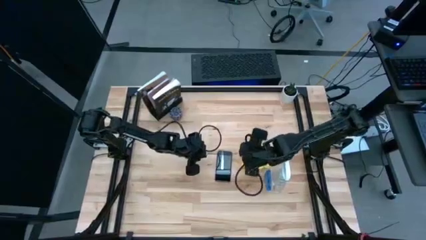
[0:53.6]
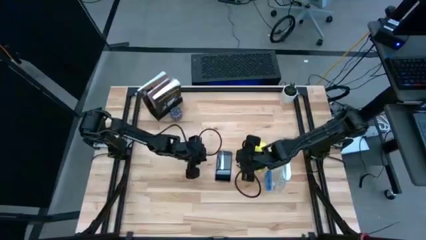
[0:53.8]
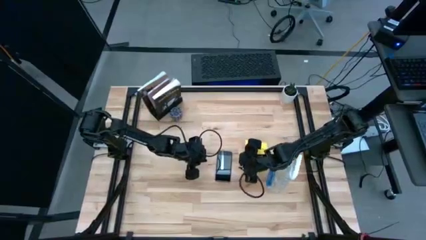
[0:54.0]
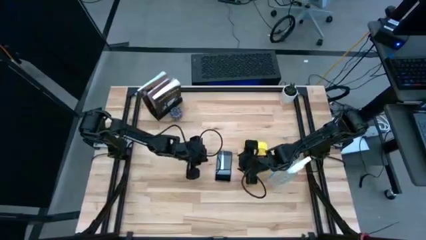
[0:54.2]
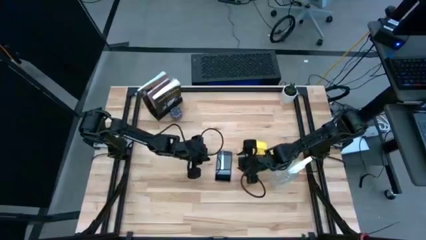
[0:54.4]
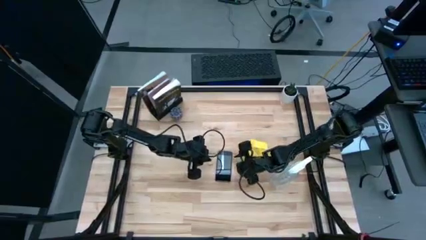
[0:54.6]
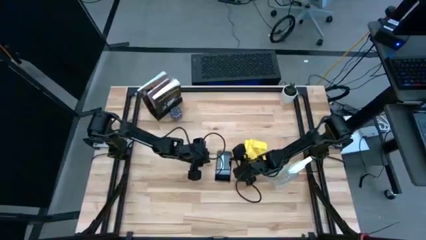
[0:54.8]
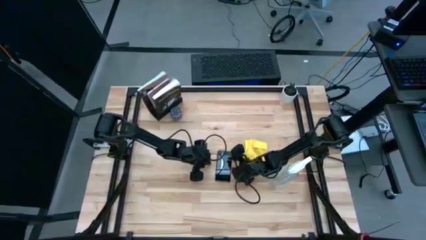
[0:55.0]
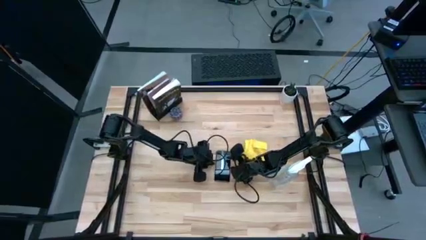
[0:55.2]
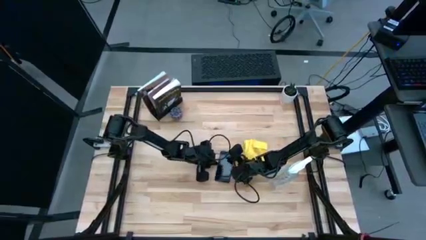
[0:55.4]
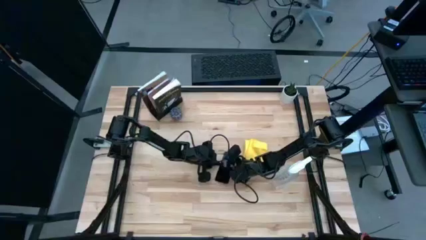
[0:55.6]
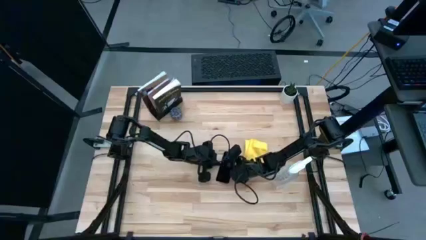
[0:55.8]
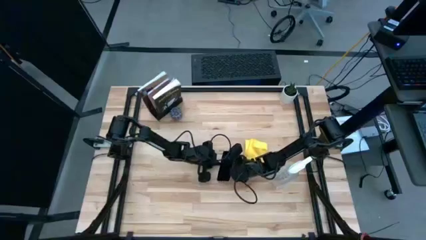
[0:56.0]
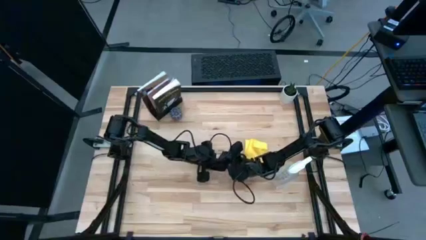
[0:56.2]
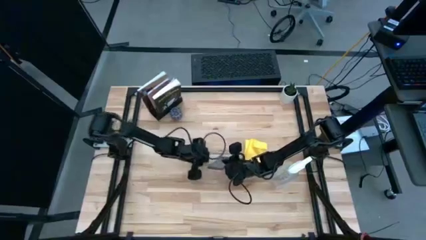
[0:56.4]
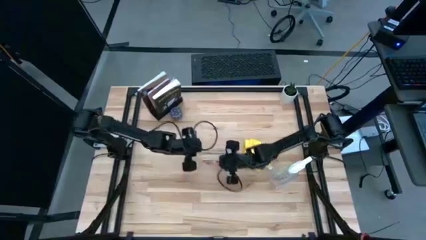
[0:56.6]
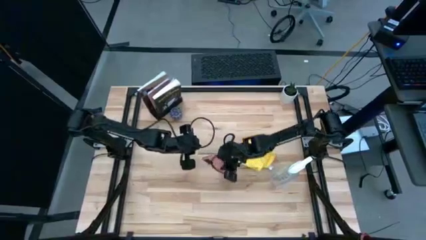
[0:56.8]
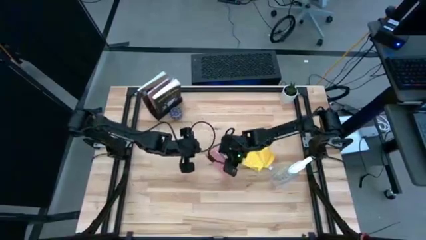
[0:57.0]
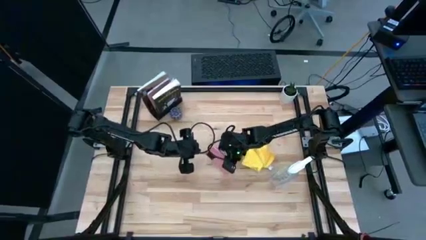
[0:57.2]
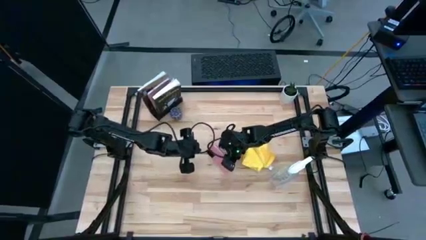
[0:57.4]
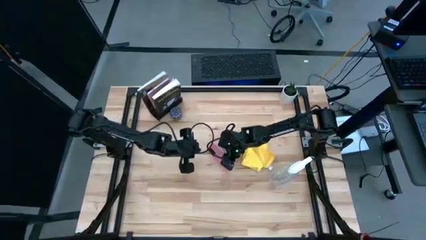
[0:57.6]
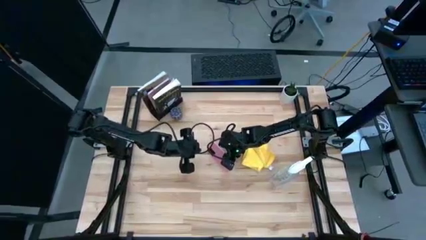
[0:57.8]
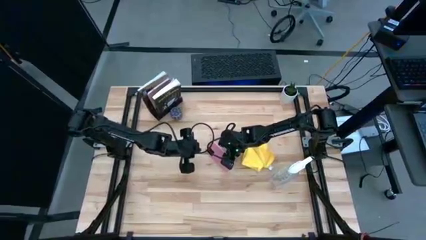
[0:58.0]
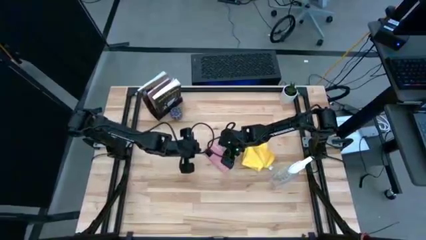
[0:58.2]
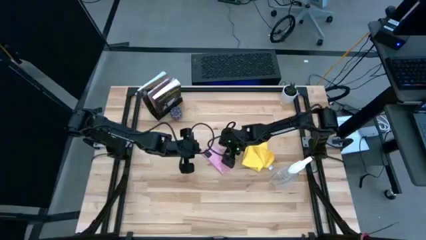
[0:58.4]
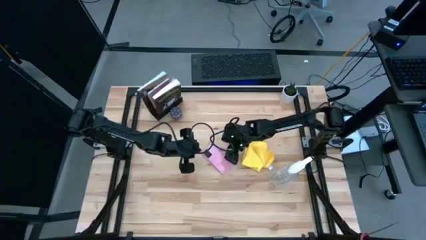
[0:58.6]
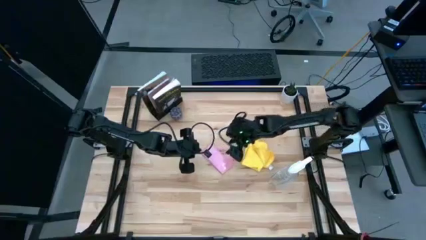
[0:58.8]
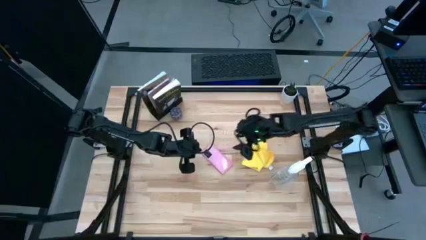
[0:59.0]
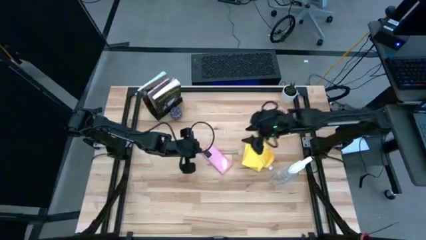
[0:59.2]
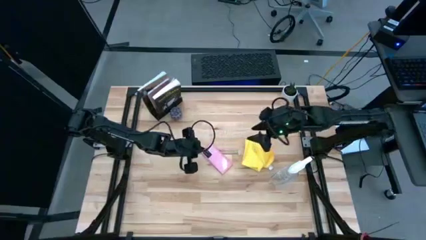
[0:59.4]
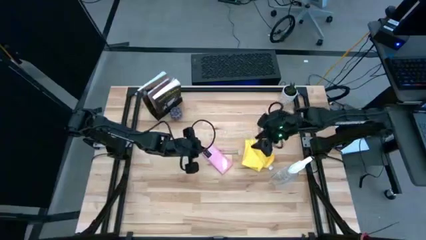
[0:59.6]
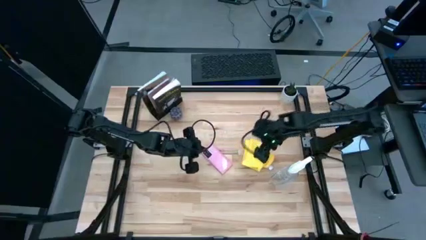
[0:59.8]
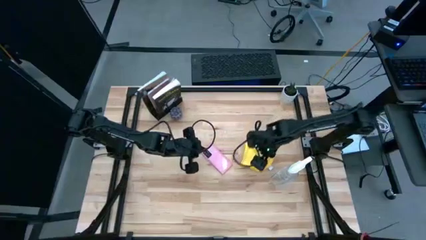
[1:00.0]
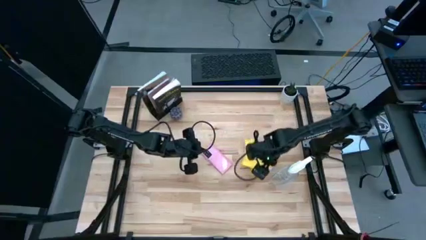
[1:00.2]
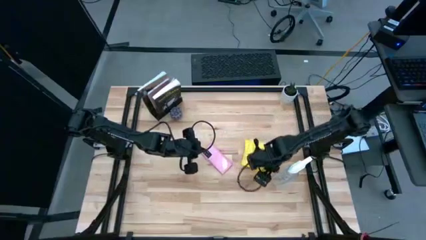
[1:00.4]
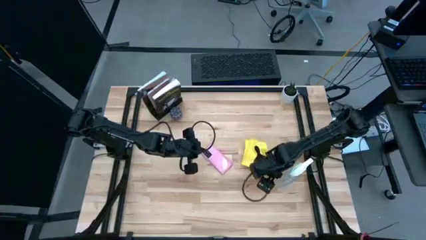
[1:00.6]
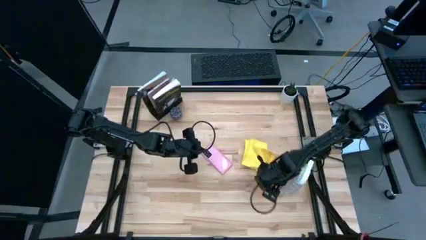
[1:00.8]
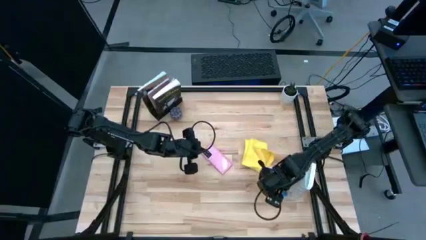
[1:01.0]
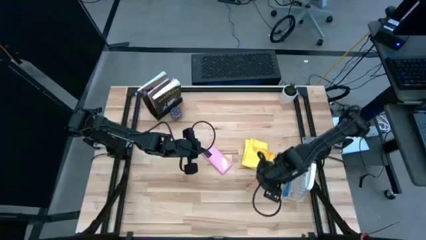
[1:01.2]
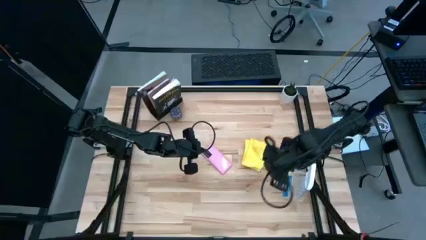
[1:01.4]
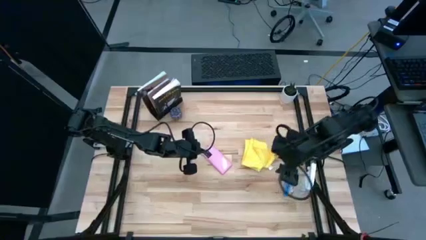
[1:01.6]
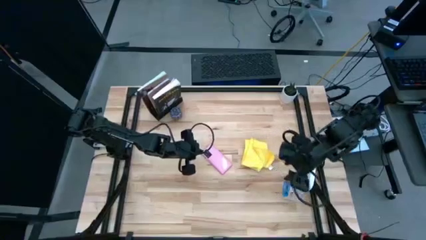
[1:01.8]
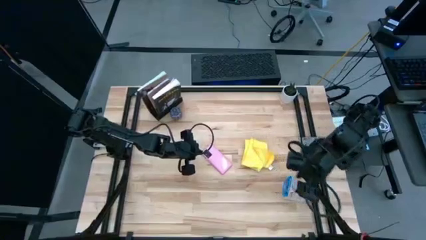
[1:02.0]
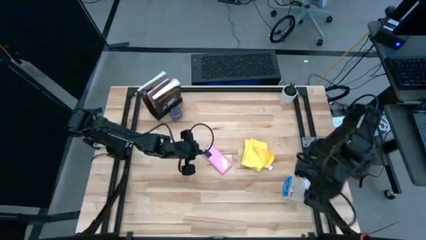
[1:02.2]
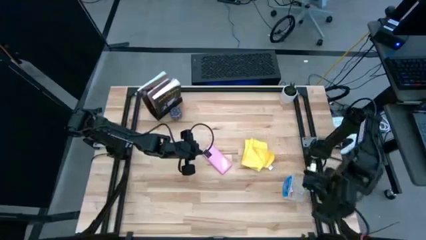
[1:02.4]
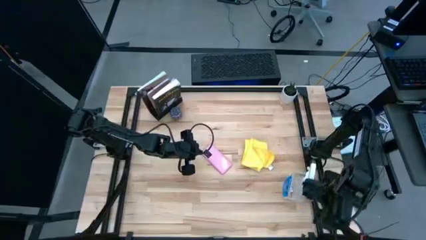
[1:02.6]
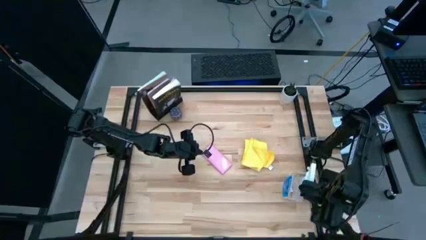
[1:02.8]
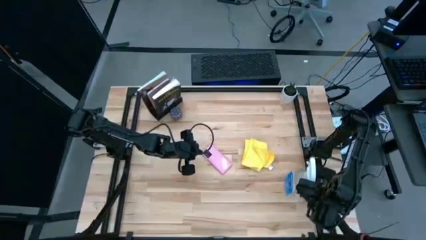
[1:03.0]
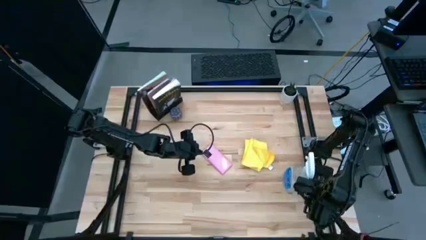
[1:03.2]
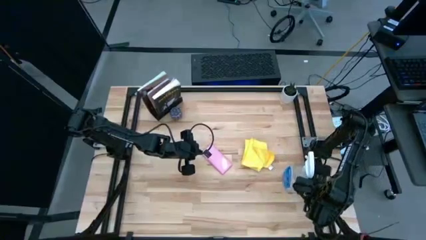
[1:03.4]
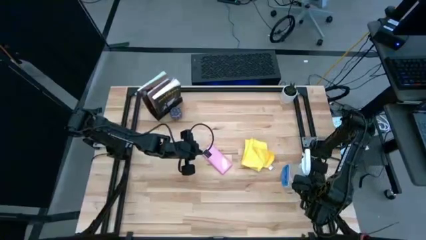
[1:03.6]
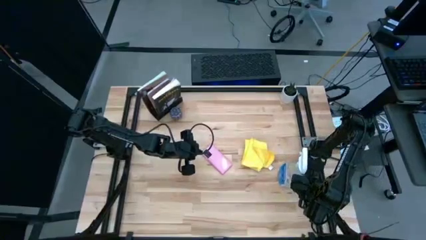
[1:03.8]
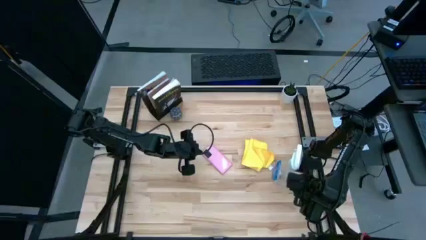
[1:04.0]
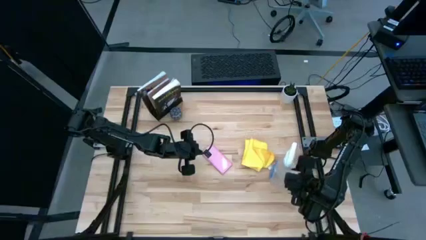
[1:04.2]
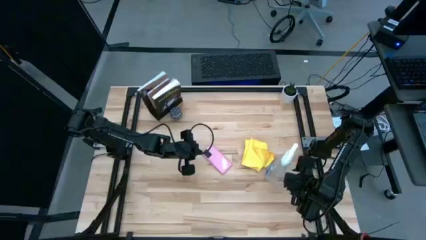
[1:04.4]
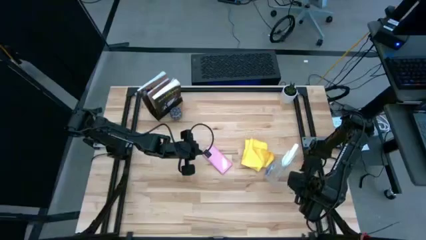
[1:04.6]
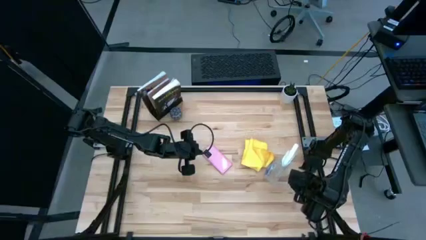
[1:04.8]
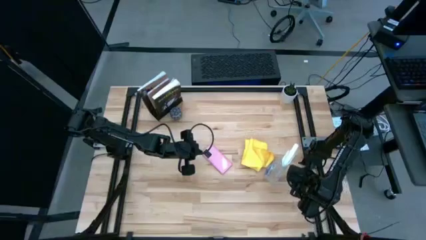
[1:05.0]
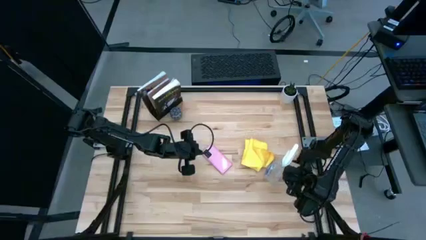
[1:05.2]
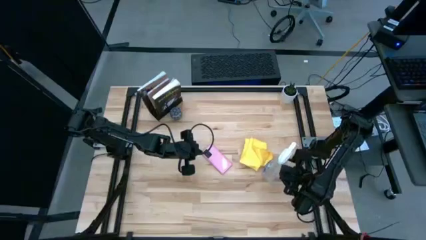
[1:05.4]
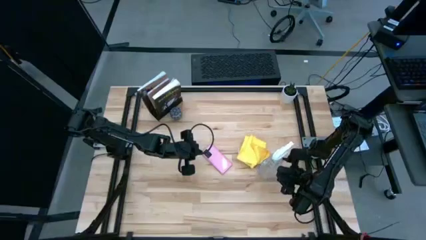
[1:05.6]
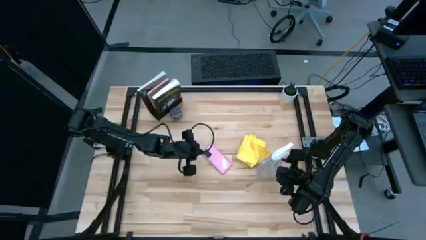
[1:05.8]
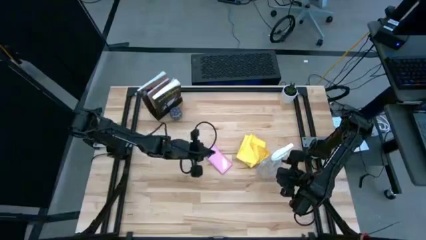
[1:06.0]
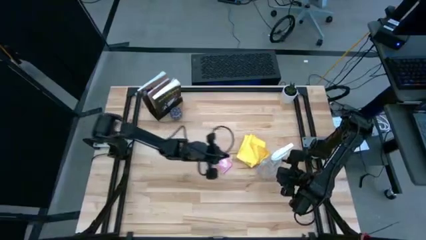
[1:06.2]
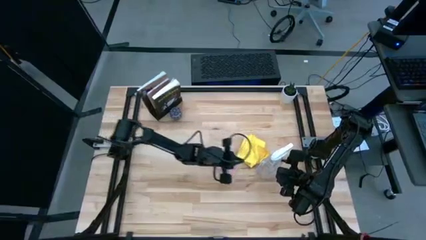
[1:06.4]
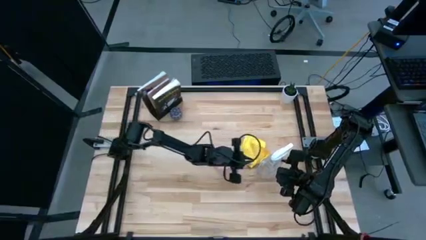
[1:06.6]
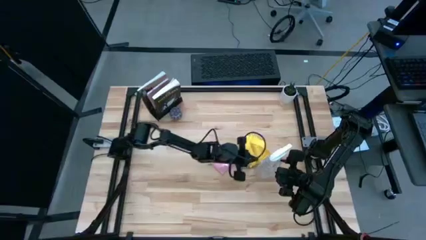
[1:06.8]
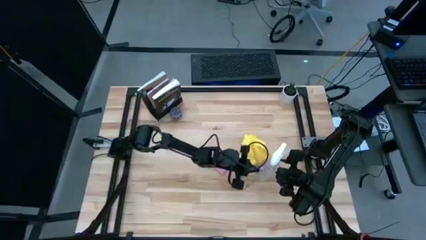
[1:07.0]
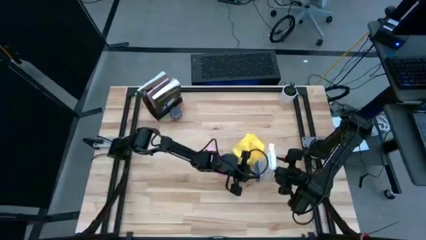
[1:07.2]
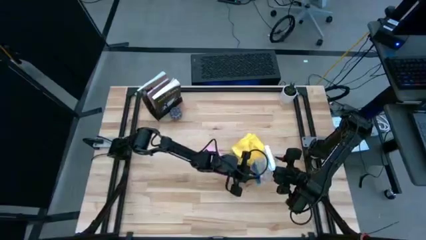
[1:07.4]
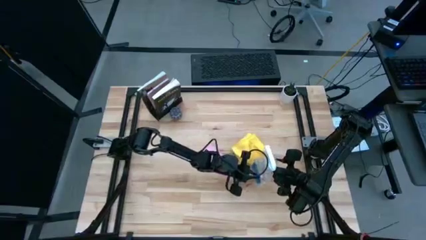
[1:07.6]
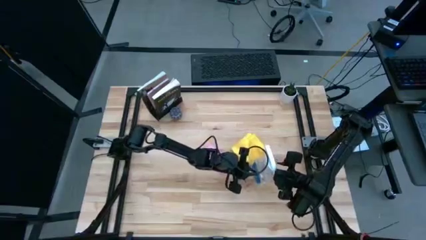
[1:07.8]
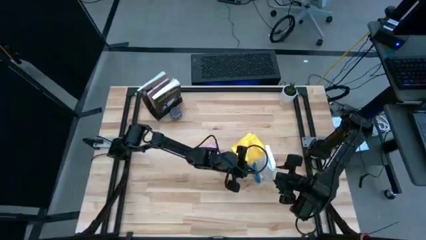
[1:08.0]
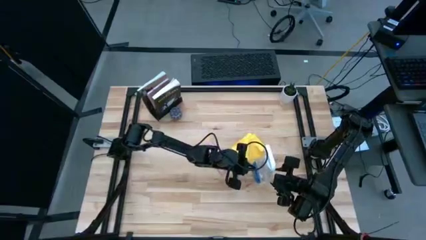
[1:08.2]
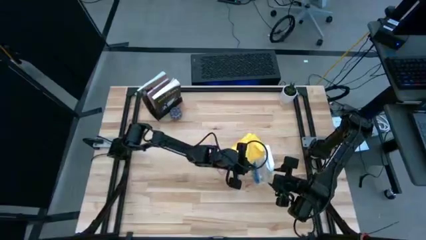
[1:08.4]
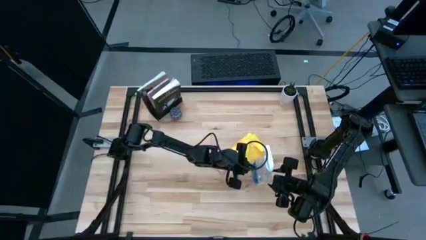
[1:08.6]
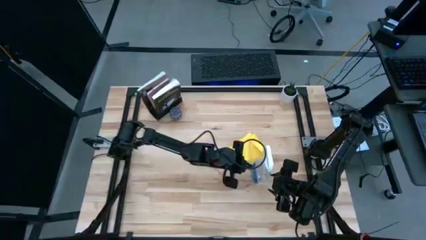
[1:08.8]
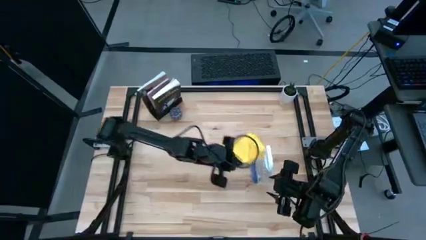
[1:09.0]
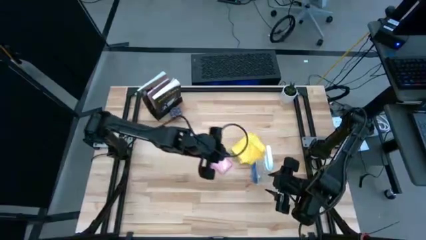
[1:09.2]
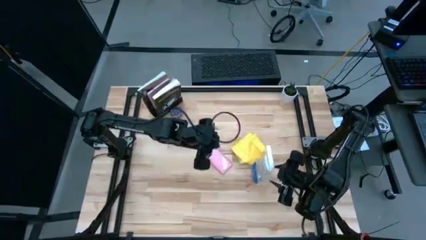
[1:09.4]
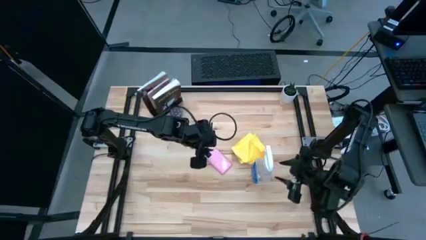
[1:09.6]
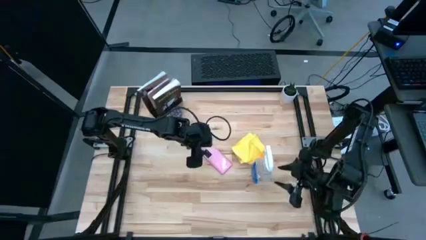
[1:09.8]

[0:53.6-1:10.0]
Task: Apply microfiber cloth
Spray the back of the pink cellphone using the spray bottle
